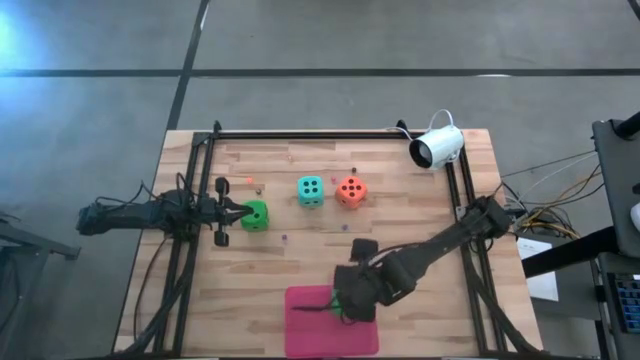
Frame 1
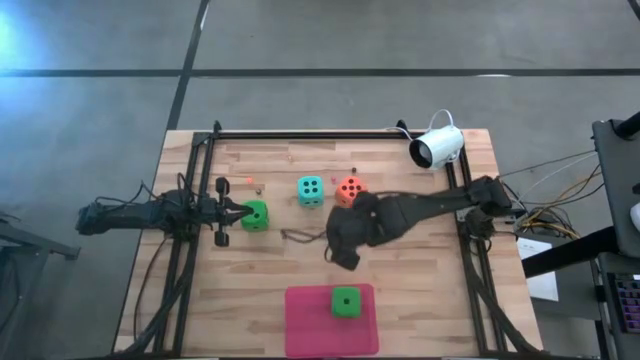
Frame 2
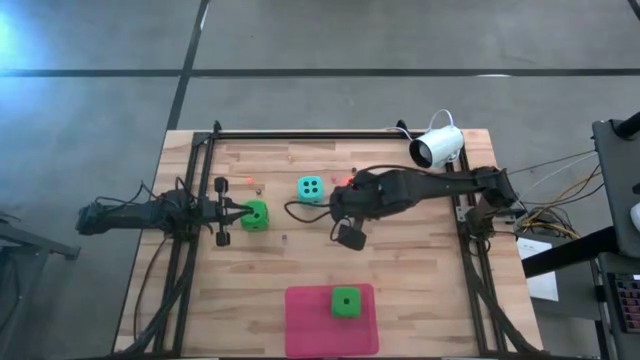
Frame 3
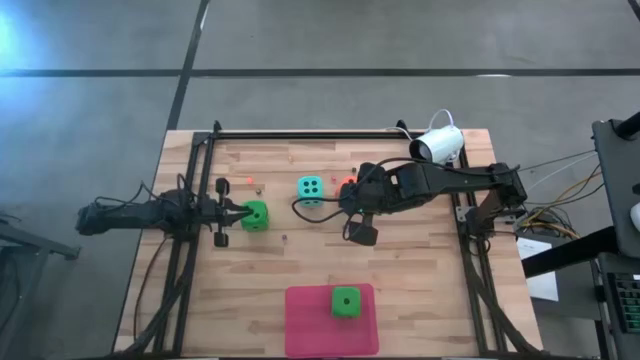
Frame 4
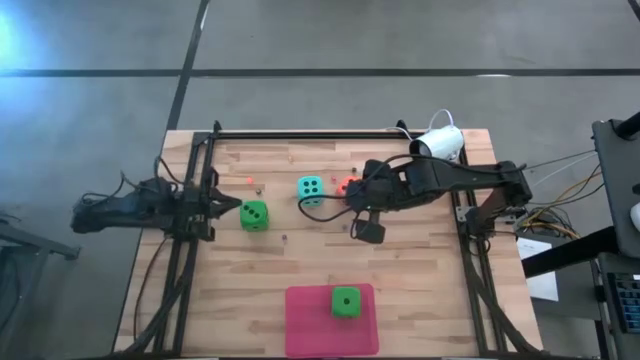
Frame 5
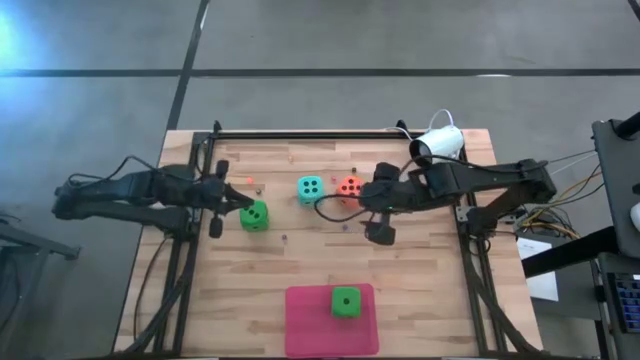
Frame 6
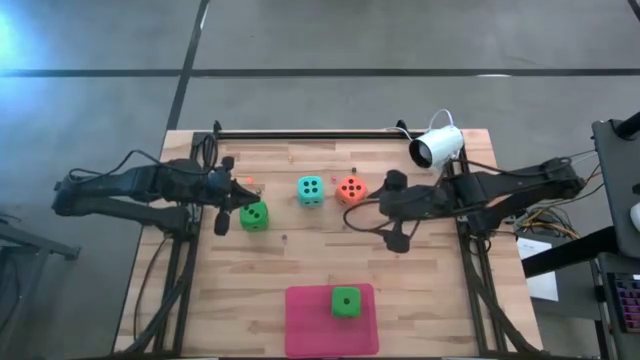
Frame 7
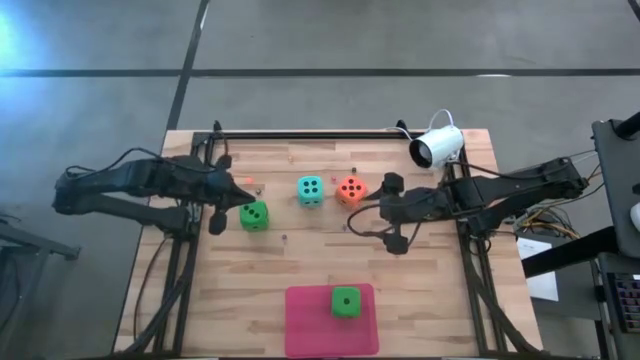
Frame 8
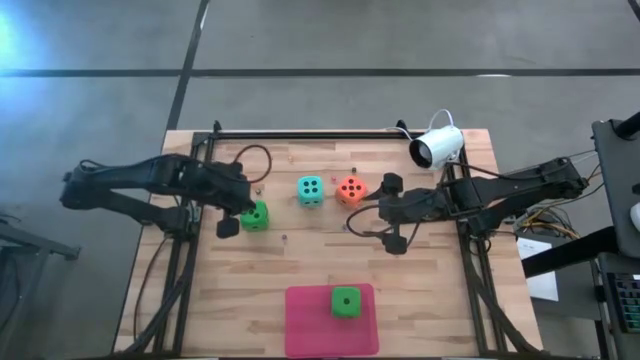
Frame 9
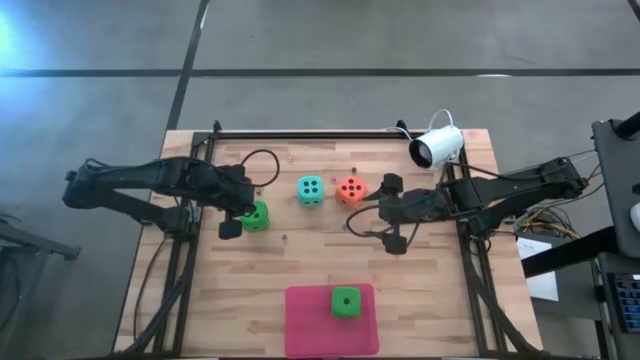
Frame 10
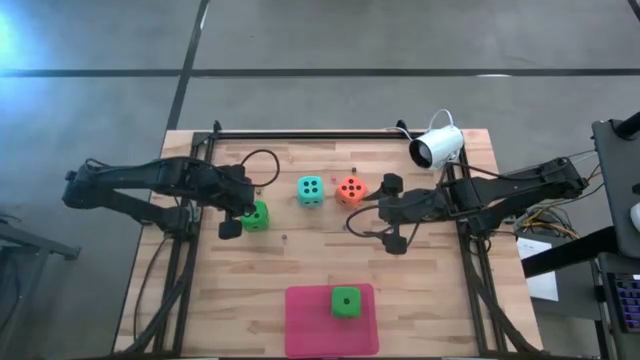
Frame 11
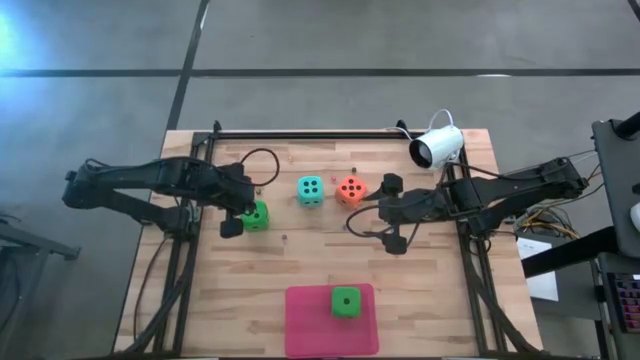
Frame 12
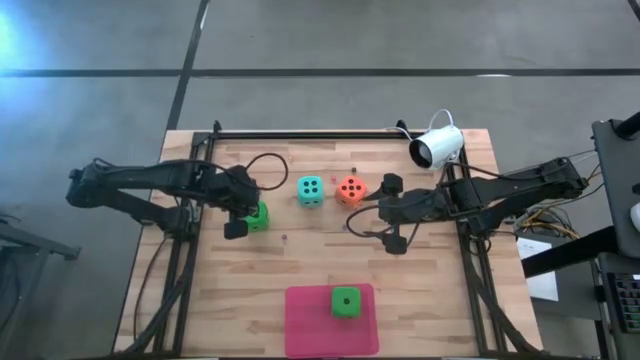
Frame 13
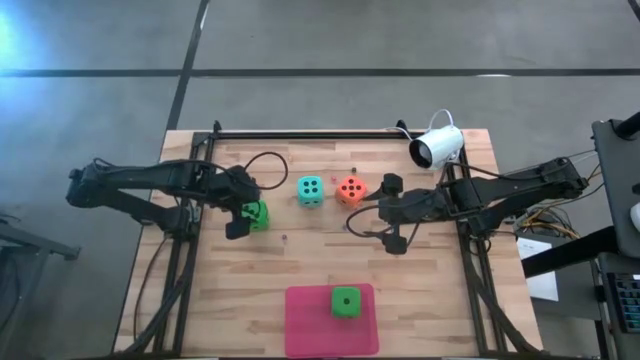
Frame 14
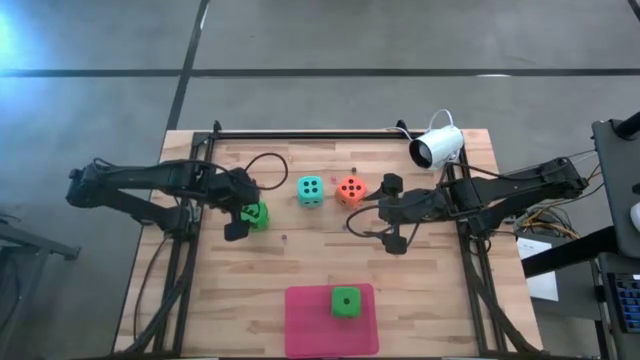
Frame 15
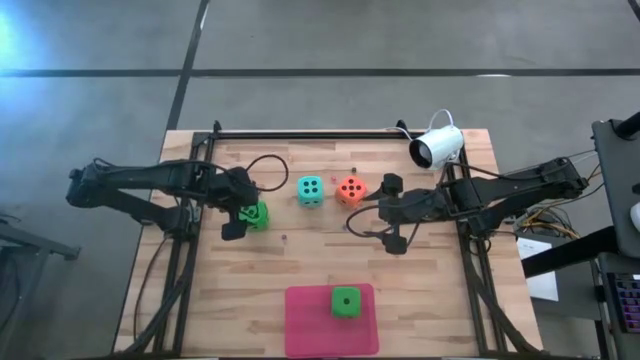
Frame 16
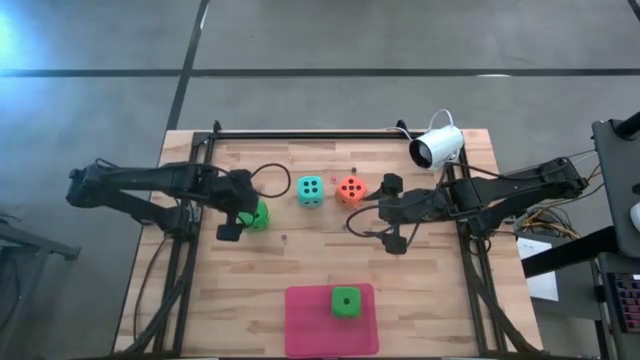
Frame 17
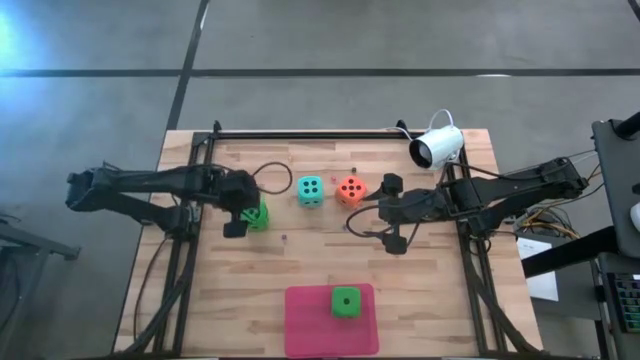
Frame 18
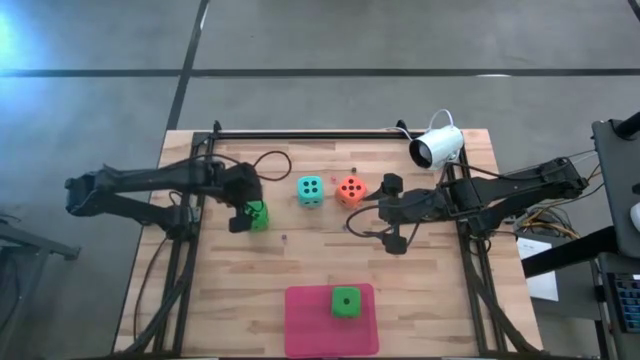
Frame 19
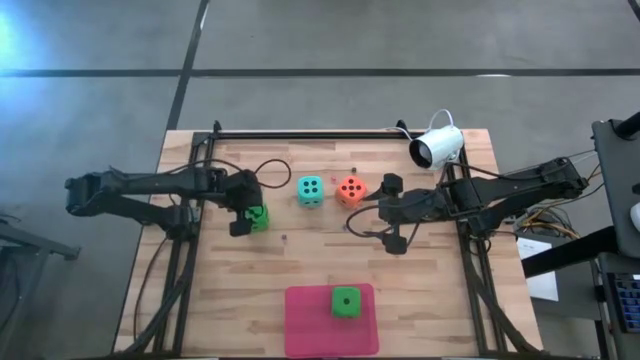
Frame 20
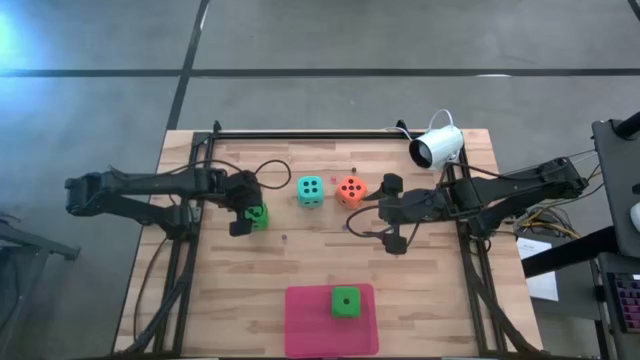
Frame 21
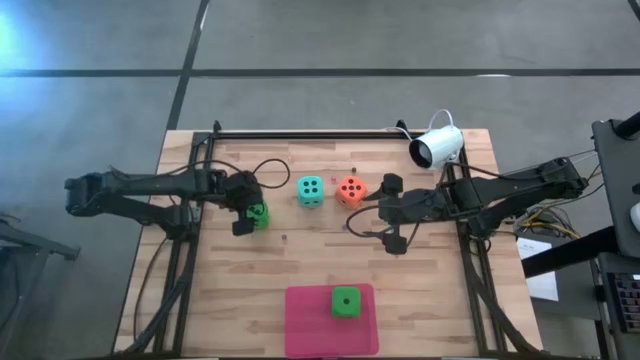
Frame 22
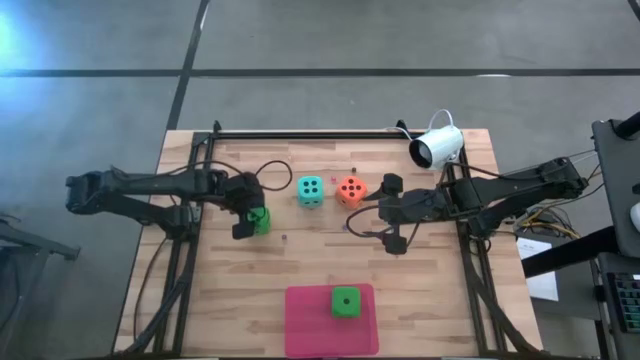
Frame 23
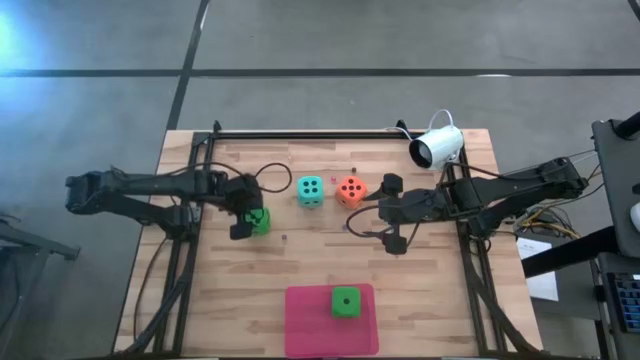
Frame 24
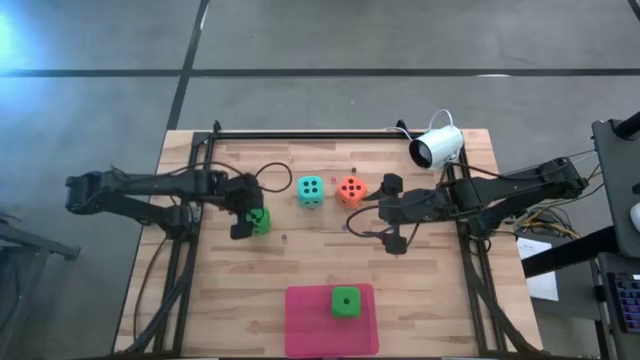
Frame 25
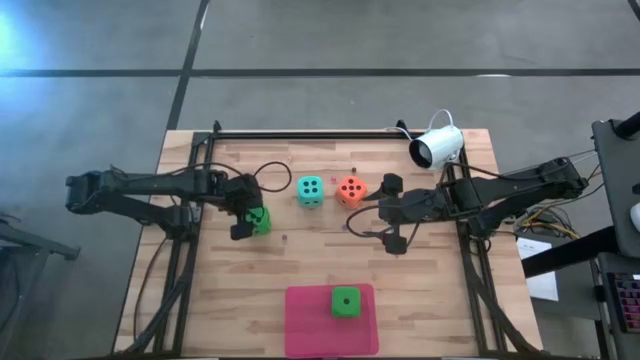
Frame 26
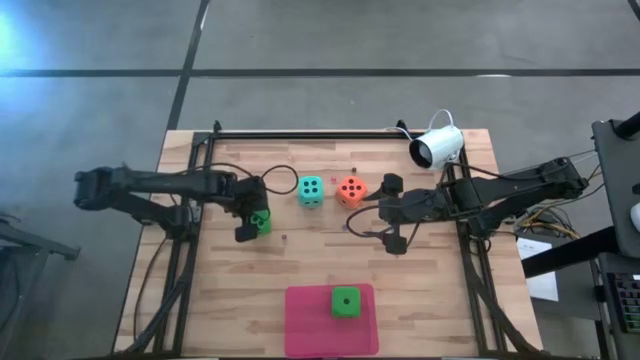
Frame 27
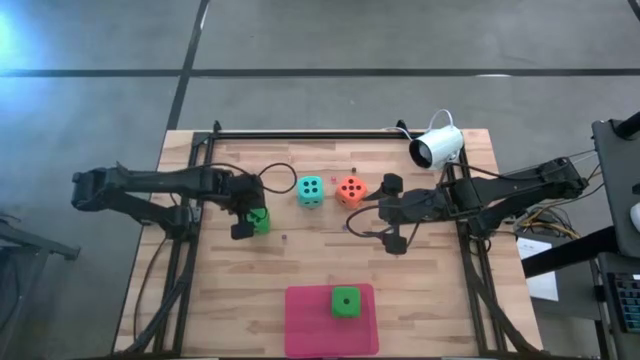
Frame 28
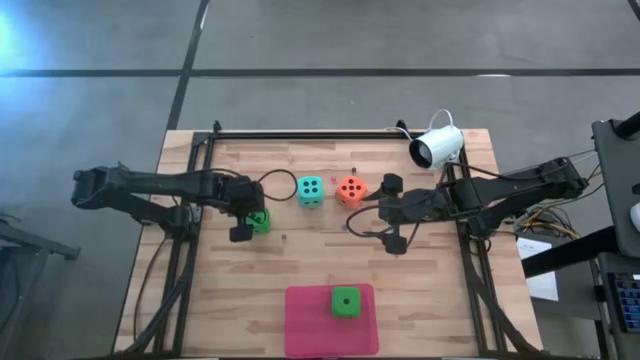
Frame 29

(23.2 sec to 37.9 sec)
Task: Pick & Place Dice
Put the green dice into the pink bin

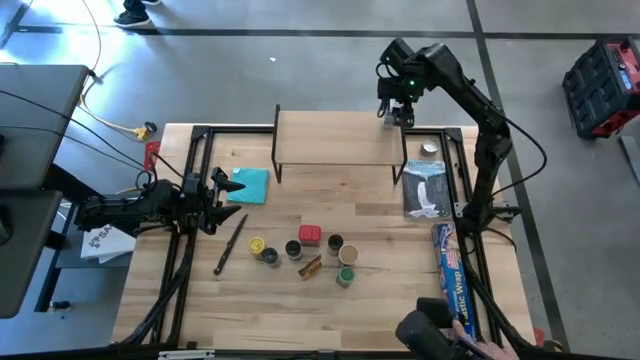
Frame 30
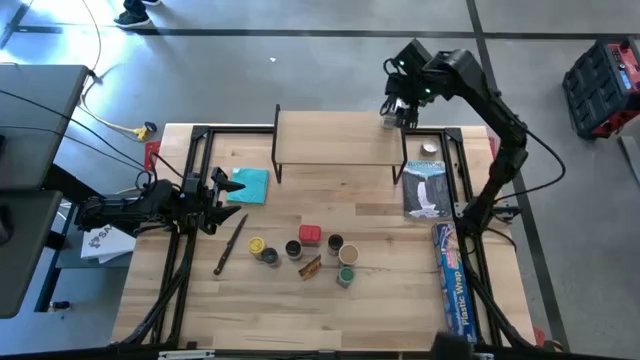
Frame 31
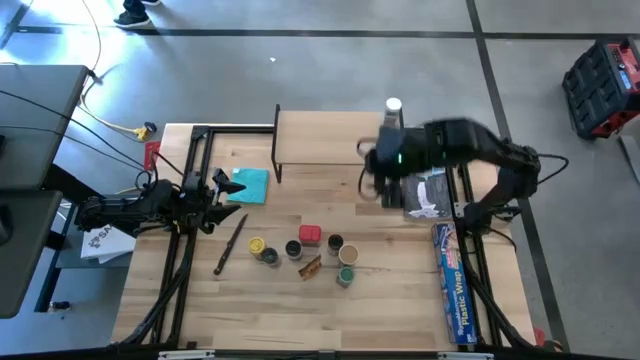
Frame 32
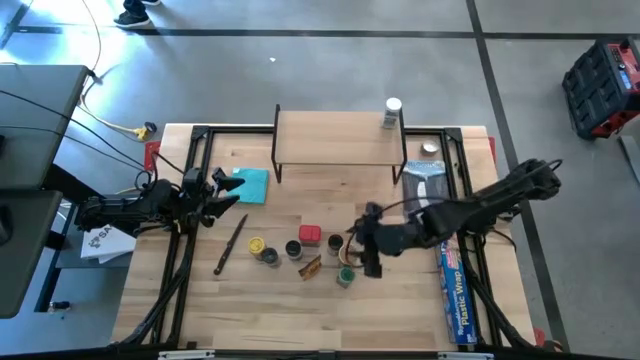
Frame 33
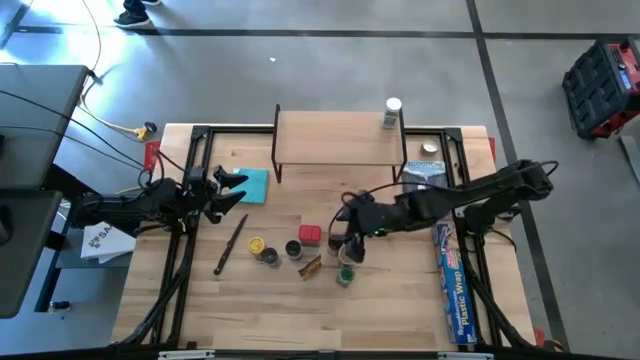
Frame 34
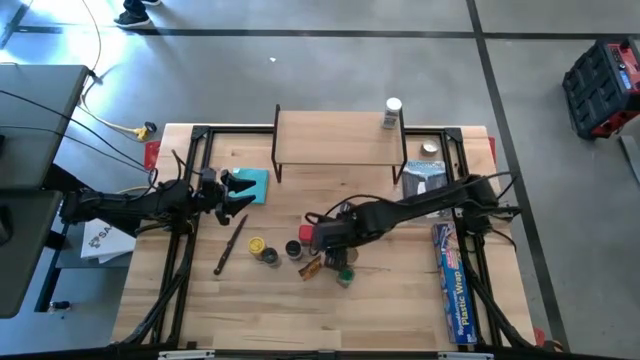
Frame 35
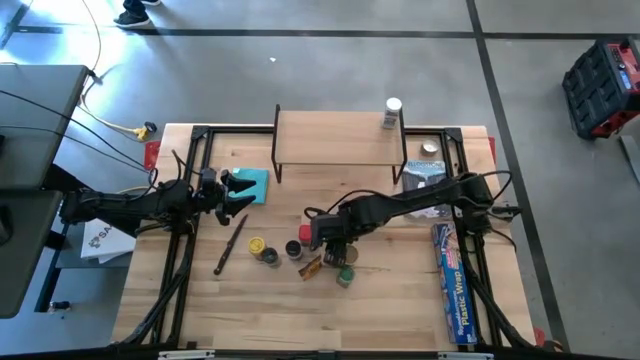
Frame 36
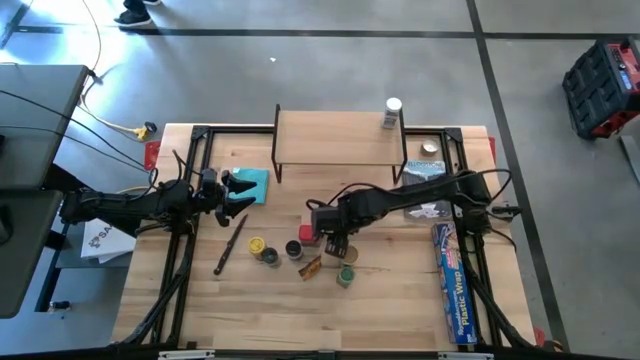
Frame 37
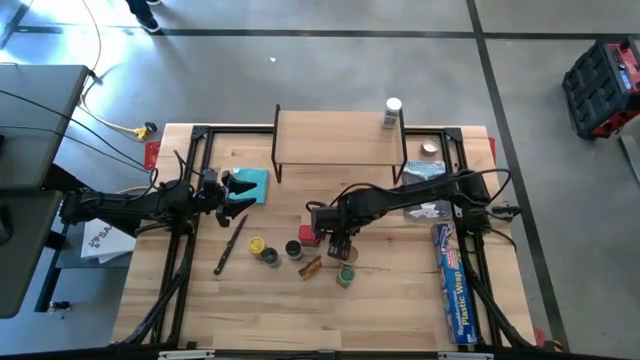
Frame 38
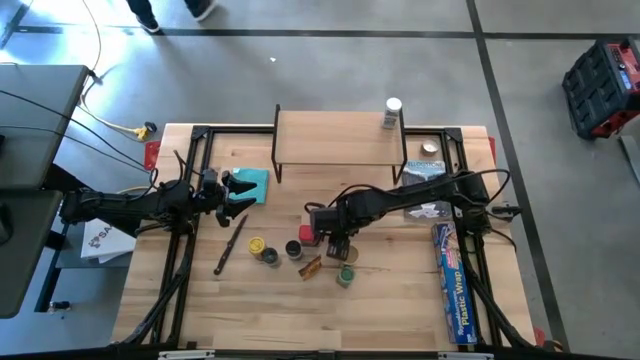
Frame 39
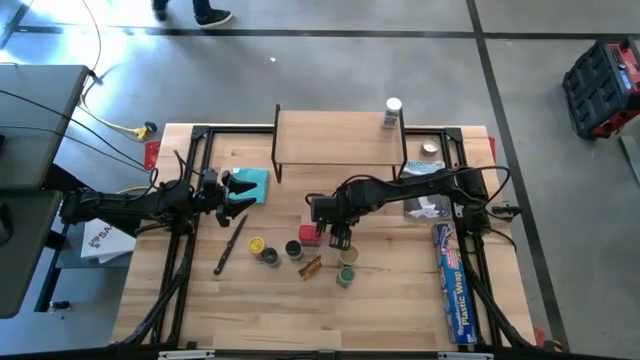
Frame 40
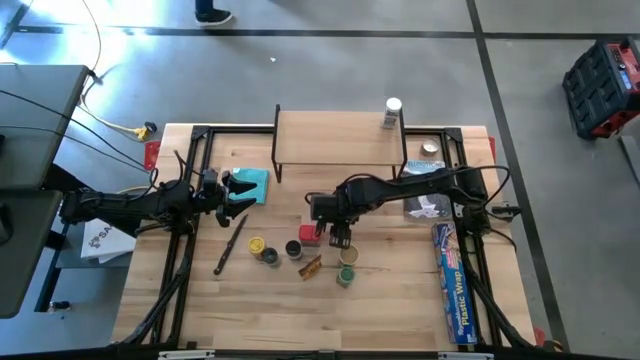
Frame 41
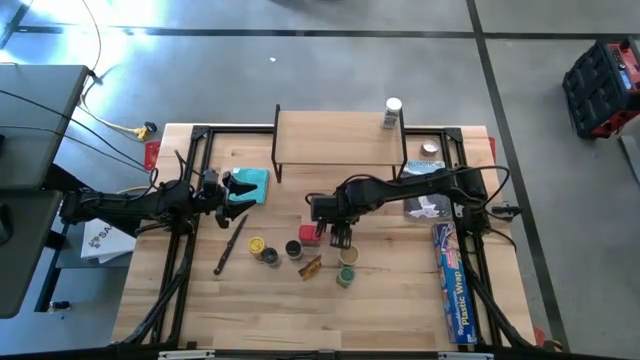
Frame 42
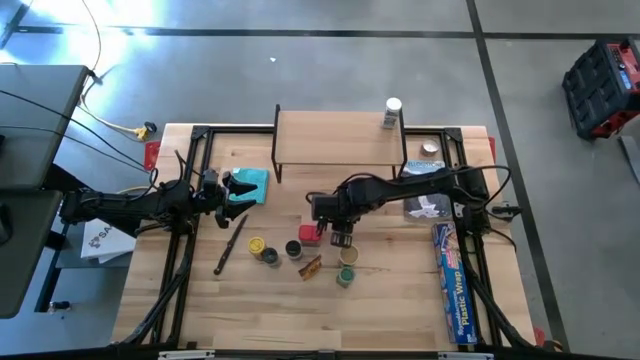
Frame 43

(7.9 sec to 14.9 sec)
Task: Shelf spices
Put the orange spice bottle on the shelf
